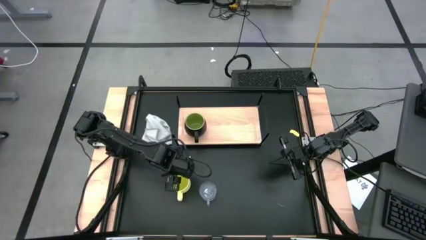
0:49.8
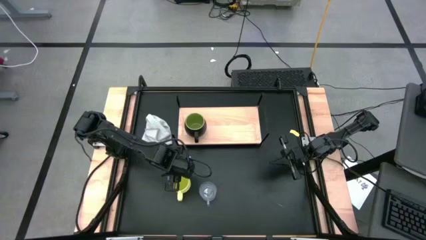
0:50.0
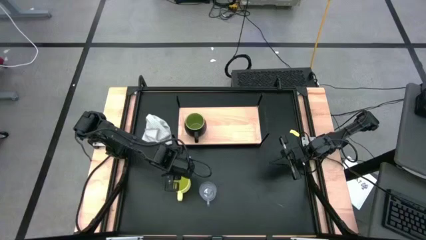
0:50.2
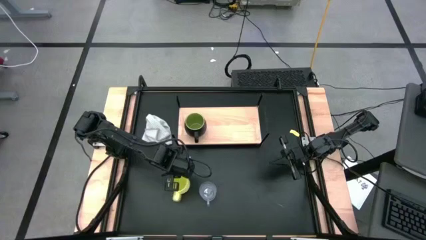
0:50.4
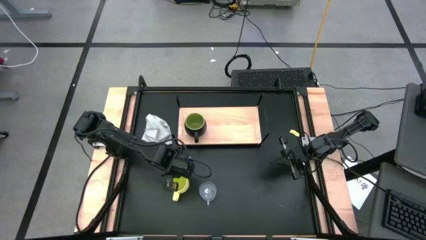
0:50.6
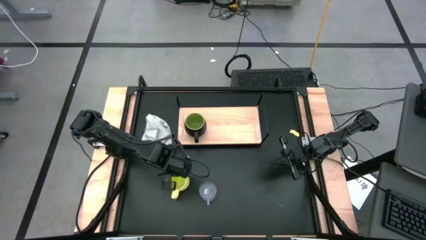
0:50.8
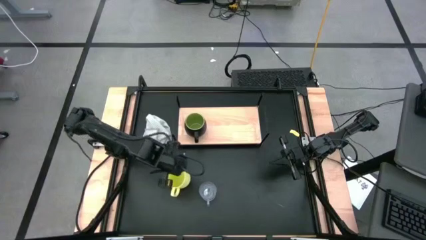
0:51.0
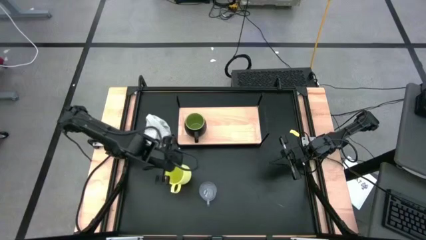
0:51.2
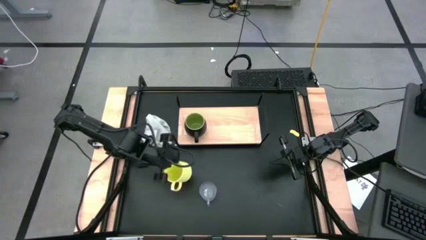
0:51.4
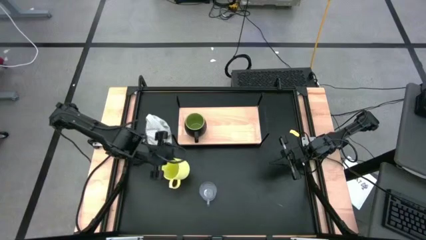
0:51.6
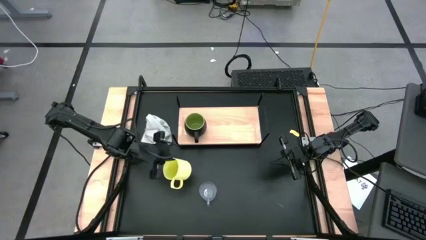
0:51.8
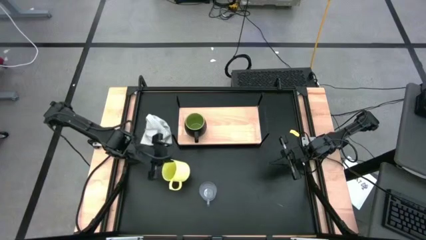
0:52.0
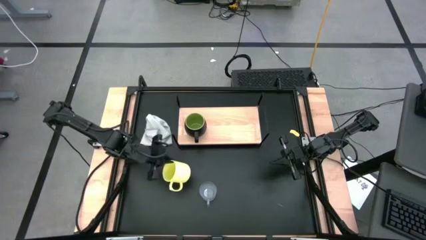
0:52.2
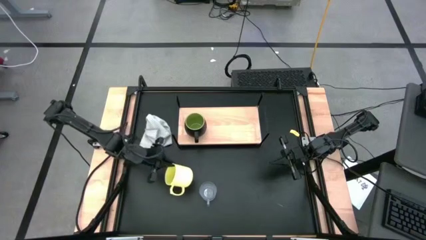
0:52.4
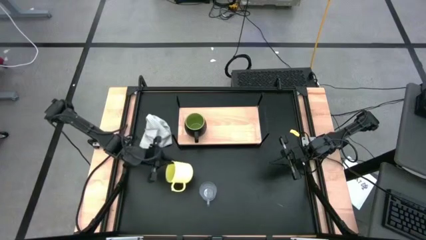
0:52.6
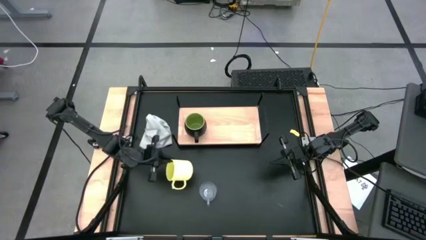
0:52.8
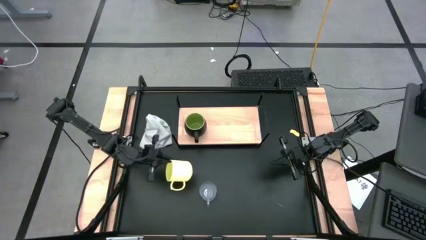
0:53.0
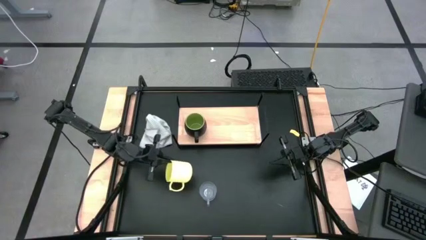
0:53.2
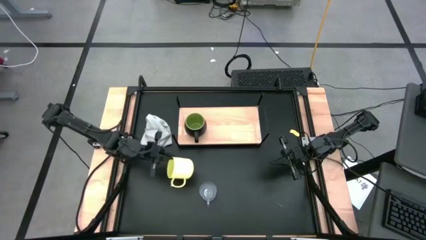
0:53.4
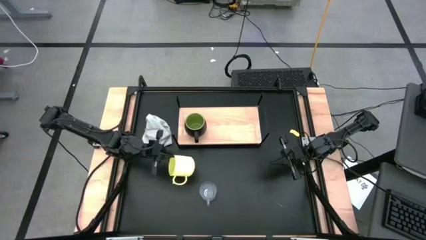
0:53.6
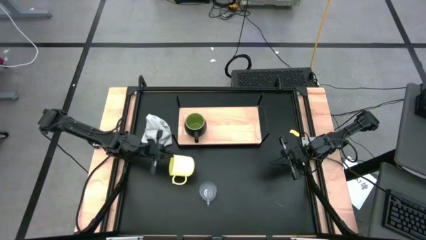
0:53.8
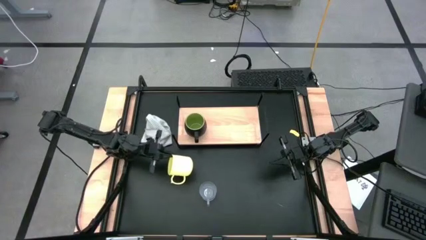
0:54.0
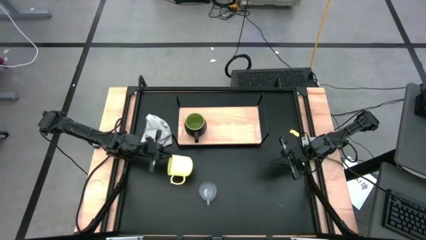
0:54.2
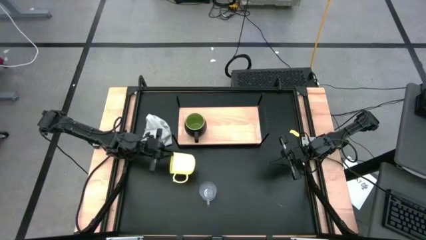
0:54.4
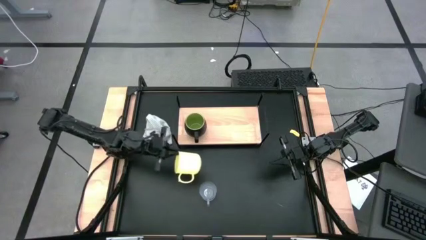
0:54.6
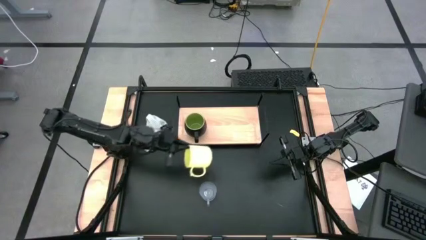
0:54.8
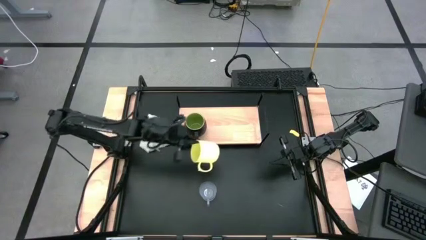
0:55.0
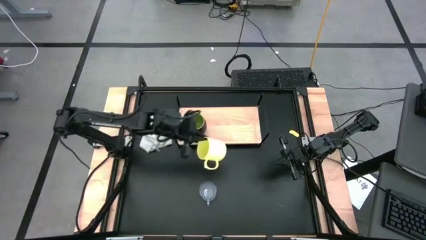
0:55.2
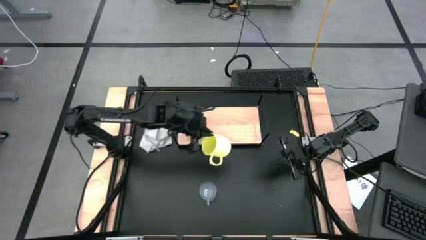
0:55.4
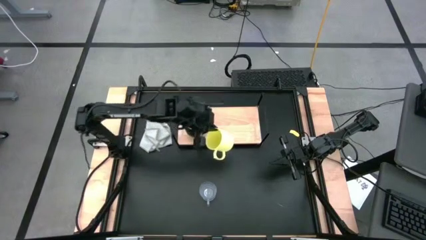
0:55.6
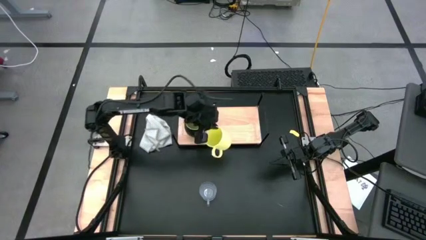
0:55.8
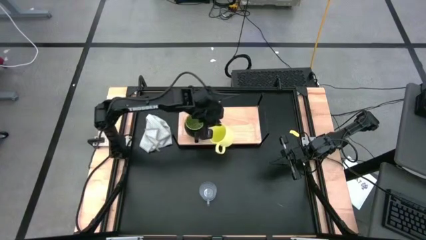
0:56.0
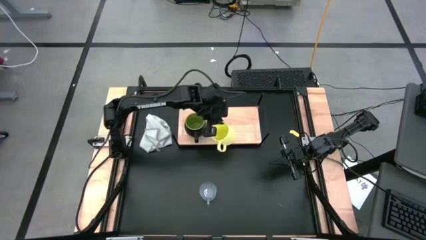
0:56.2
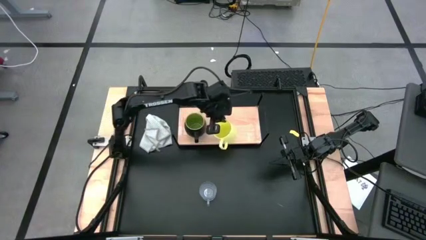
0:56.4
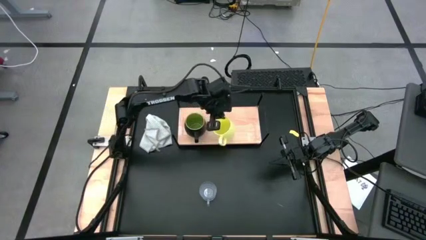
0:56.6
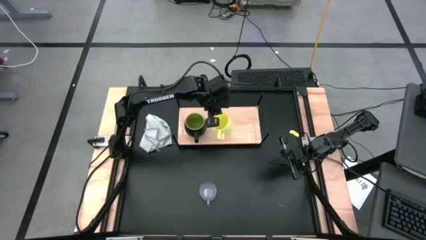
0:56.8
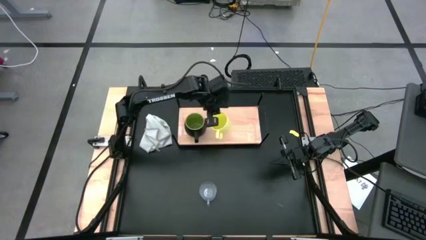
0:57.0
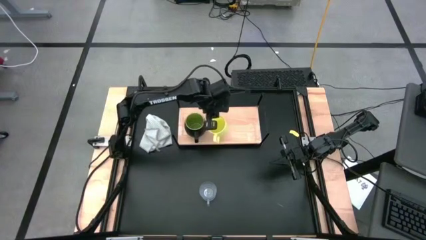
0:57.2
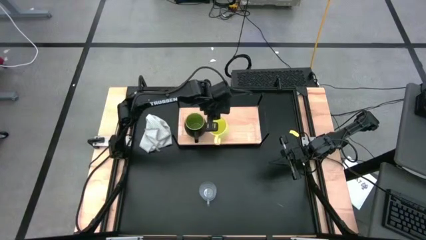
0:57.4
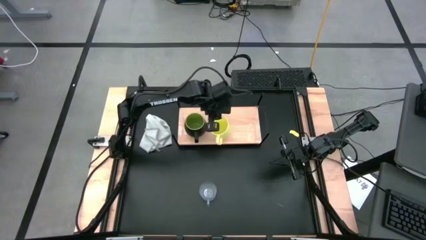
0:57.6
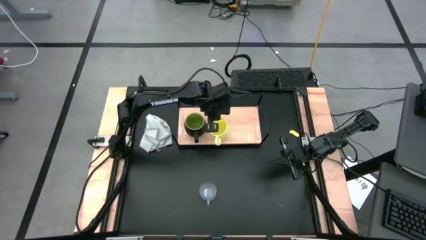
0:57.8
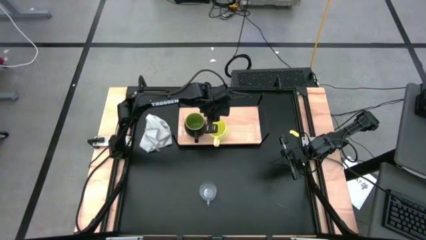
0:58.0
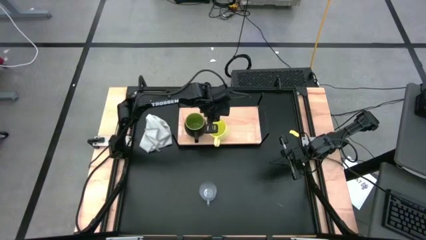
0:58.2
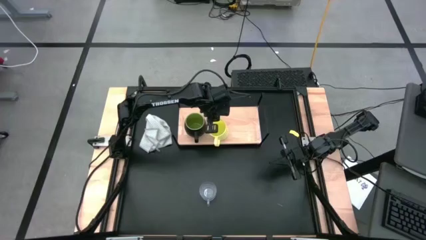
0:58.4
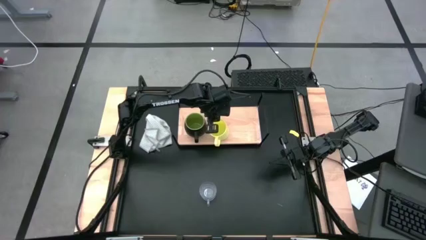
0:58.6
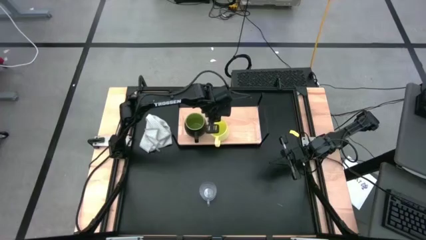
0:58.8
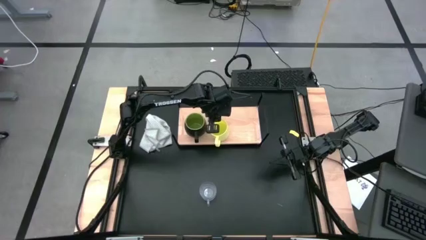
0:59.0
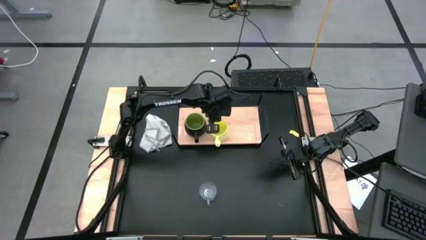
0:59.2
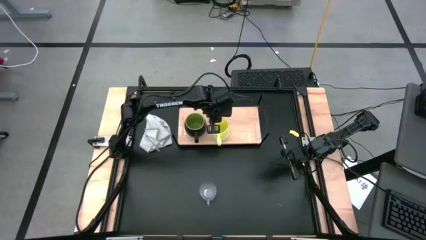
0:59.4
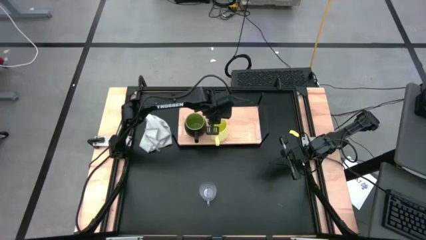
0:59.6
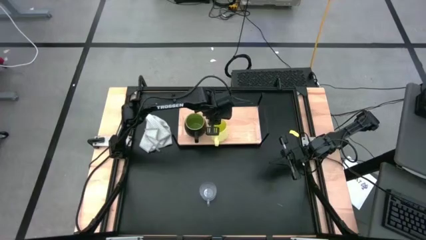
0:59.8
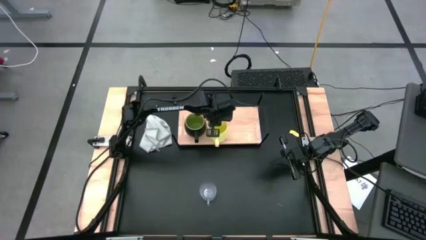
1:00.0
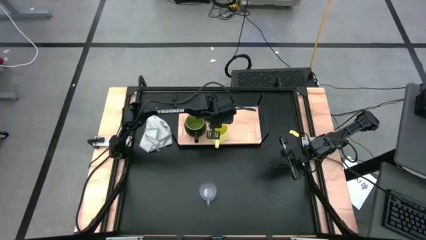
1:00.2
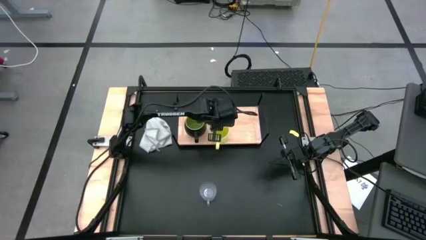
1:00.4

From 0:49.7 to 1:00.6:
Task: Stack small to large cups/mugs on shelf
Put the yellow mug on the shelf
